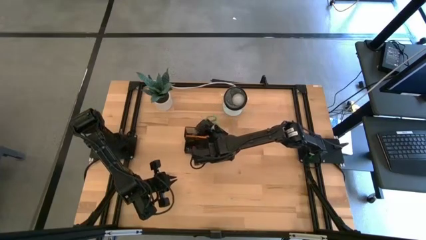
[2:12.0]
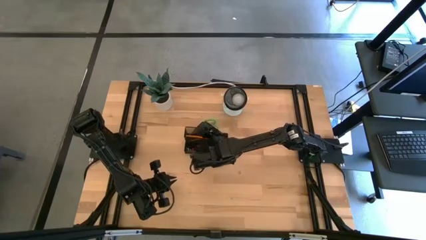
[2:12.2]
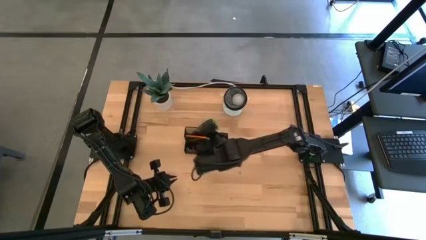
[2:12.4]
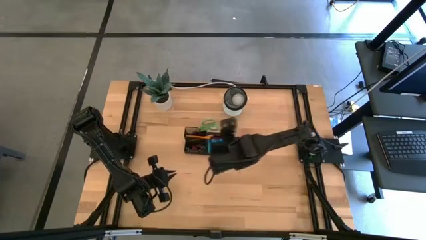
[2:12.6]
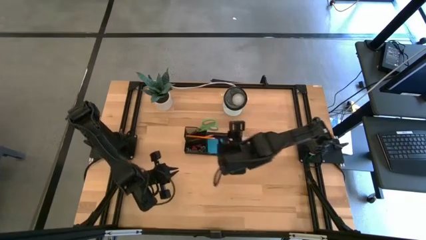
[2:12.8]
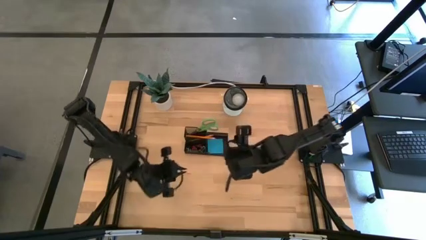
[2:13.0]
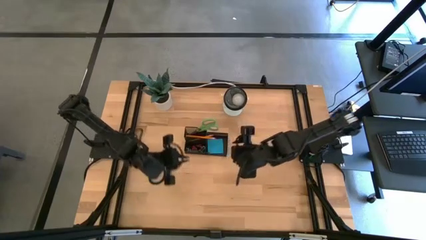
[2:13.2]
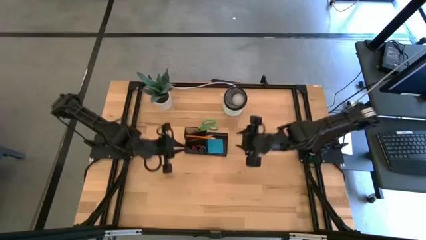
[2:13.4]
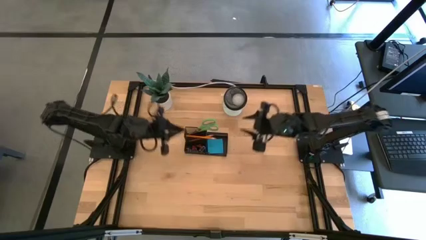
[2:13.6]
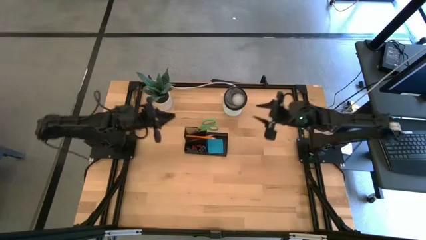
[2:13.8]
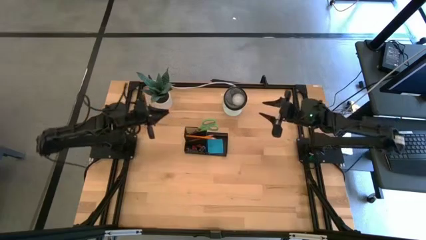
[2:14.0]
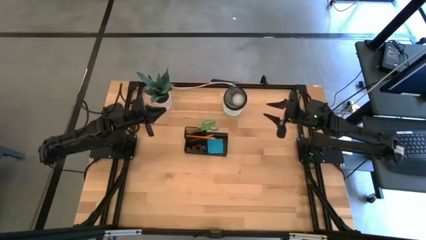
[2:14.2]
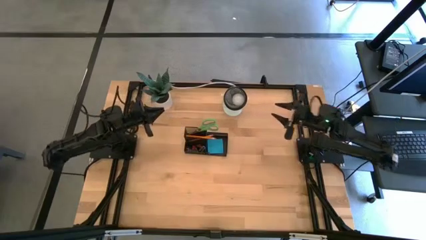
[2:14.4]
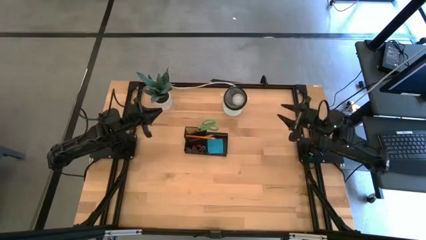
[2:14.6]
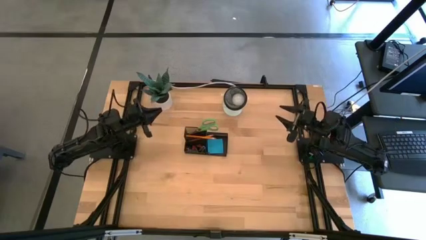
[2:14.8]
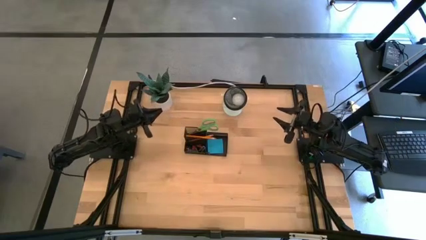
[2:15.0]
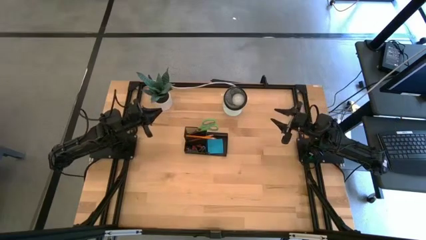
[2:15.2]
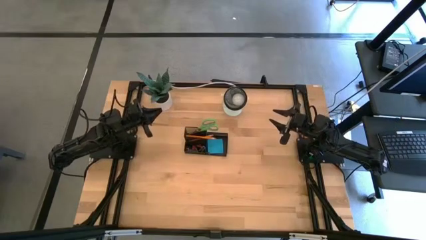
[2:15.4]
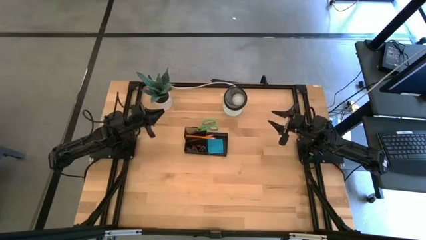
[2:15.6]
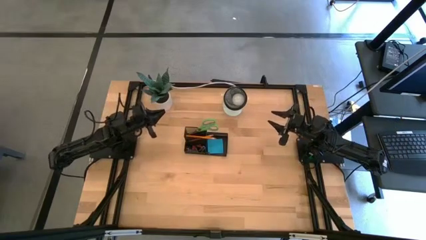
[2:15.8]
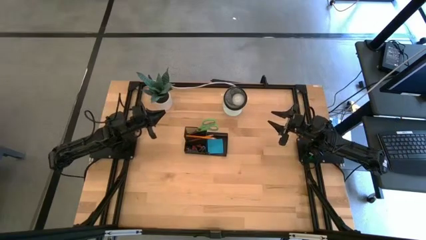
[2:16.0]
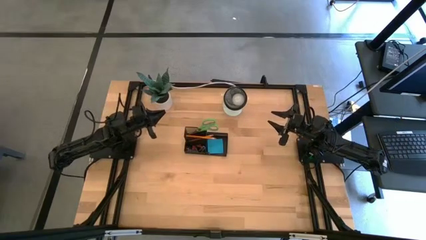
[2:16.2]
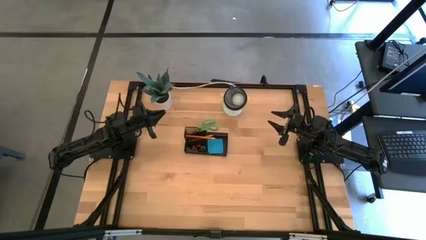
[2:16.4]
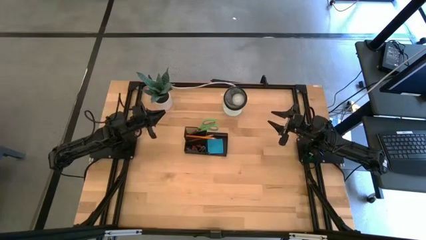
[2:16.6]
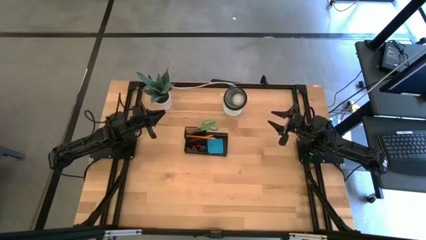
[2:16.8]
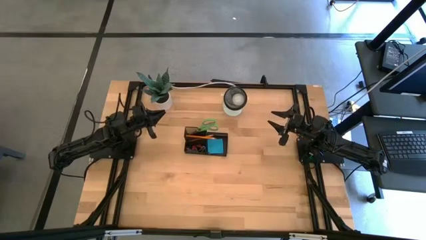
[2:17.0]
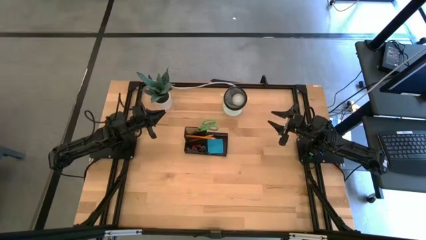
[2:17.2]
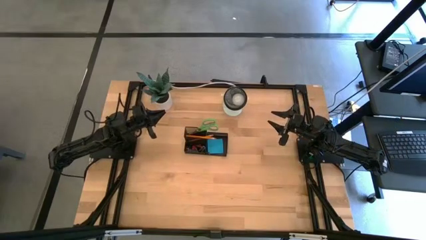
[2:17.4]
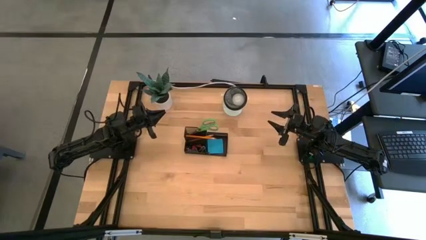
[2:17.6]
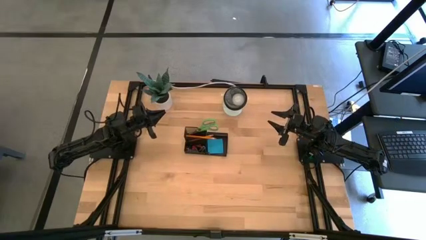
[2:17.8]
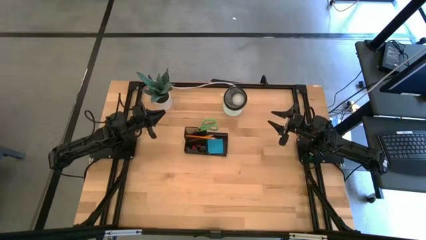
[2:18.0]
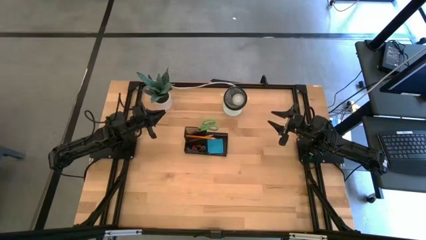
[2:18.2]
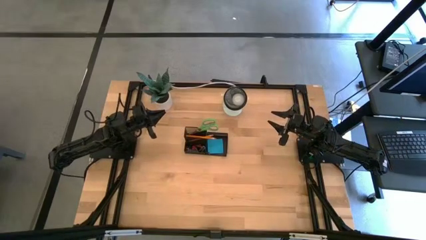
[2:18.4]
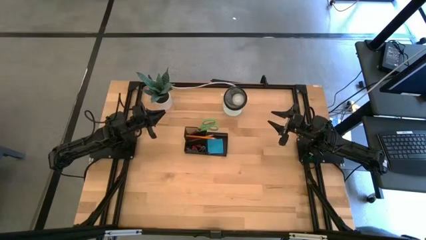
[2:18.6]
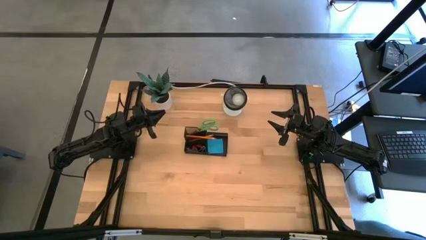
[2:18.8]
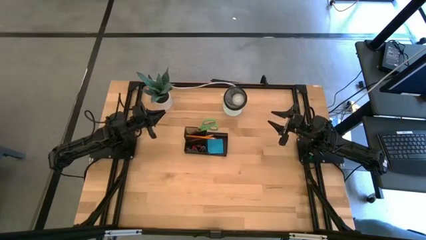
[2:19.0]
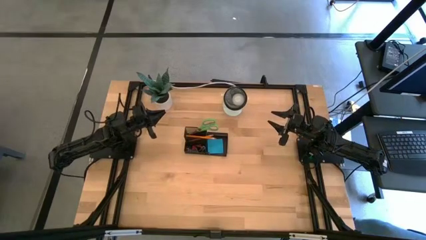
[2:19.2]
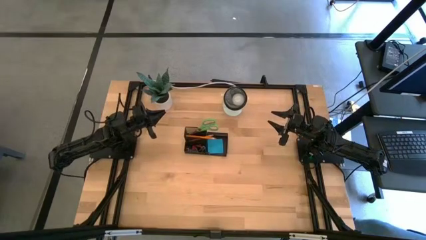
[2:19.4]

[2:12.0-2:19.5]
Task: Pick and place office supplies into organizer
Return to home position
